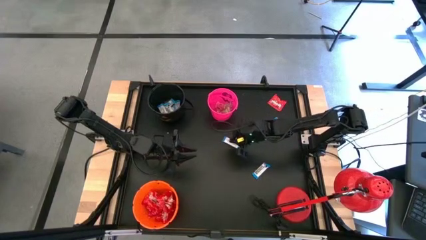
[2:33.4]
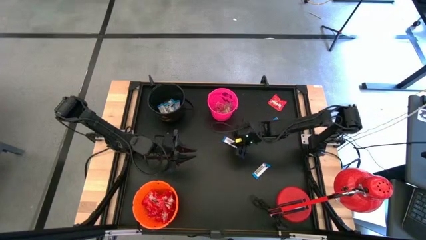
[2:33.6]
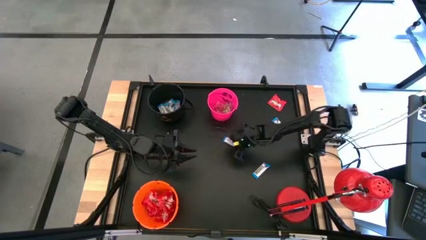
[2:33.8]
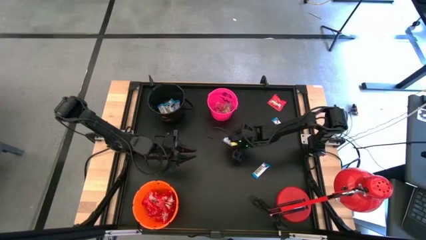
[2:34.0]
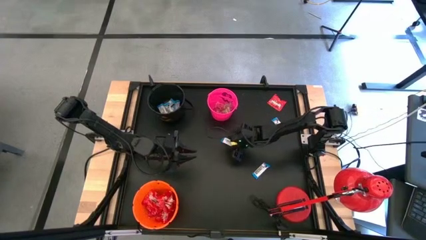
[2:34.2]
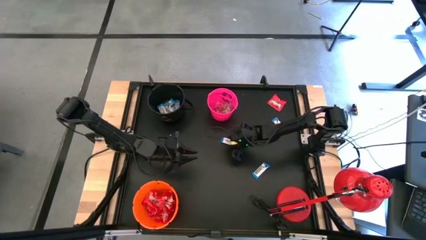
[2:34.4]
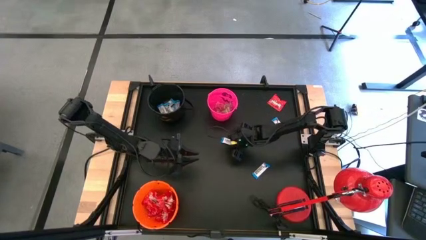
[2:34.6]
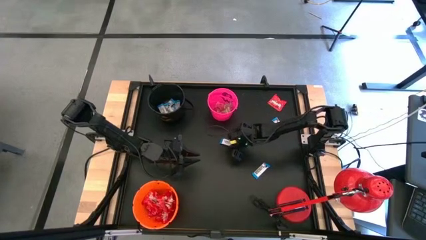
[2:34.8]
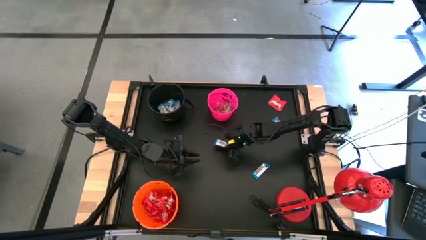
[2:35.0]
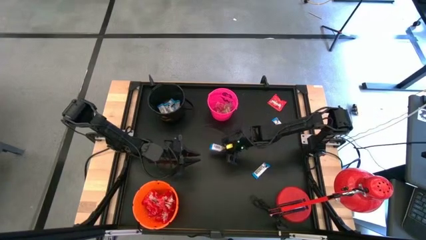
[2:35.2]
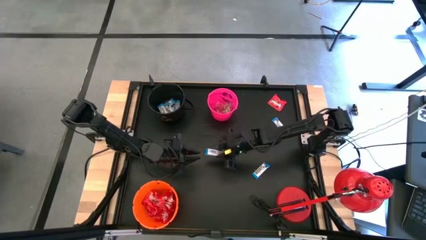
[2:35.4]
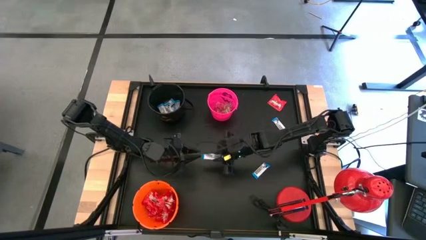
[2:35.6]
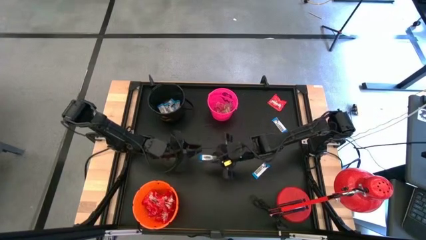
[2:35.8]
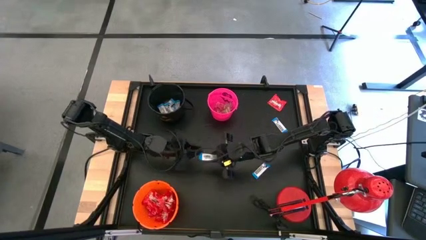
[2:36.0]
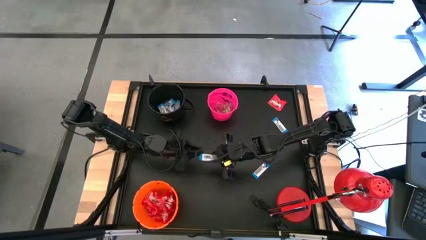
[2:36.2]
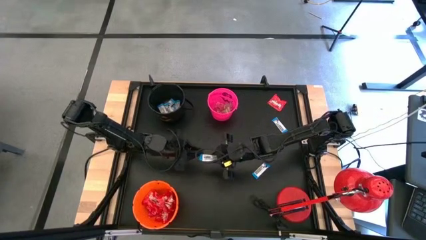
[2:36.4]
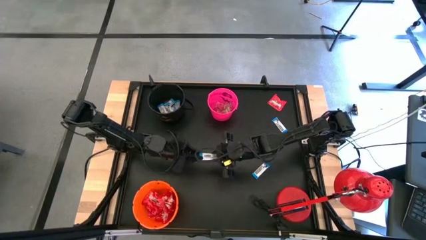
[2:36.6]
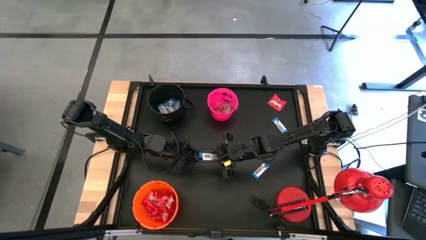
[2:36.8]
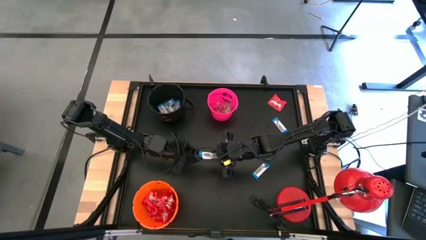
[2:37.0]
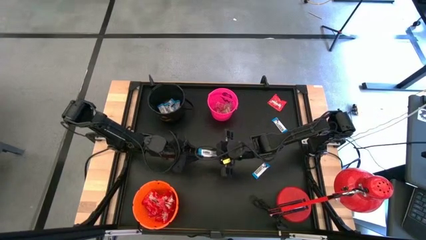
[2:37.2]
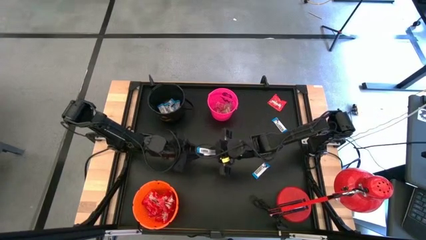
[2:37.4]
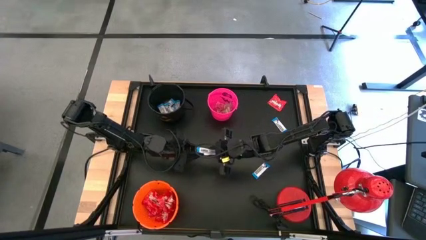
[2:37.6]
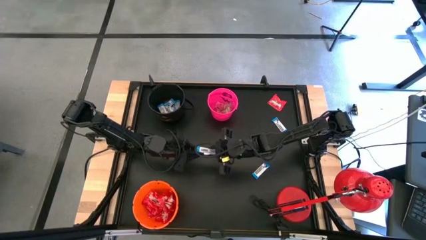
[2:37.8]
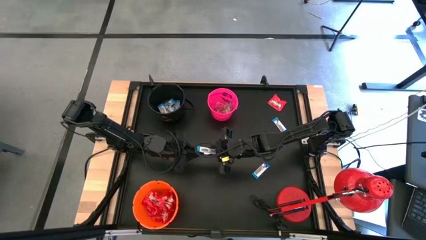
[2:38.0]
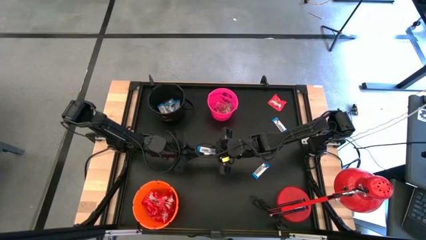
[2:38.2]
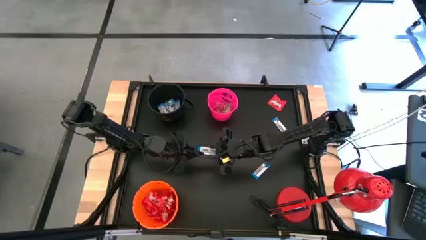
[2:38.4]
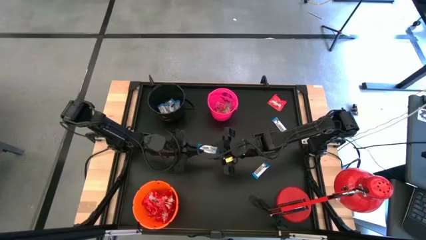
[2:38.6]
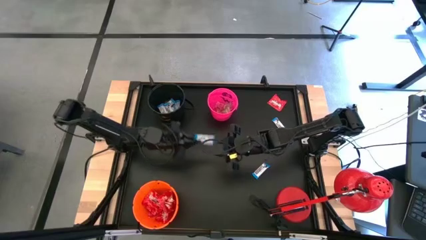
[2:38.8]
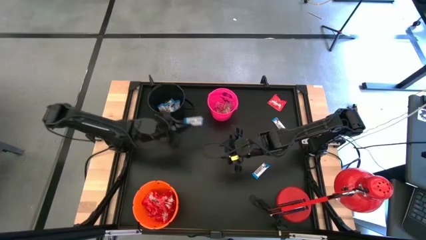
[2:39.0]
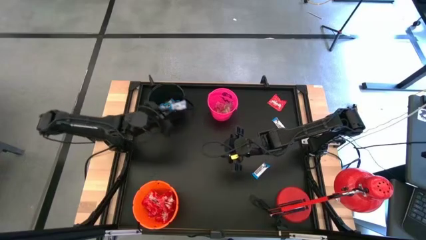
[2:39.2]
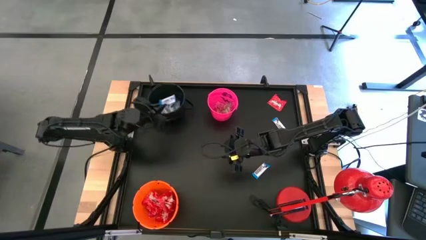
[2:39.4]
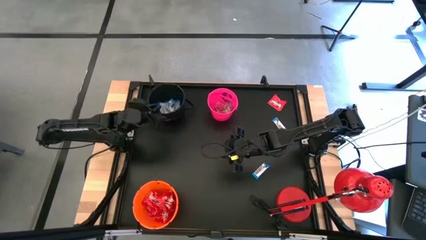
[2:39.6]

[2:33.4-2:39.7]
Task: Organize candy in baskets
Put the white chocolate bar into the black bucket

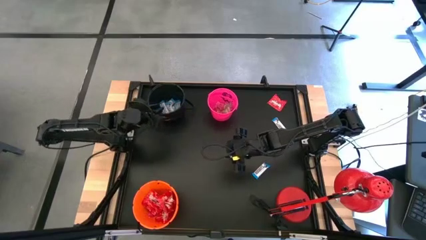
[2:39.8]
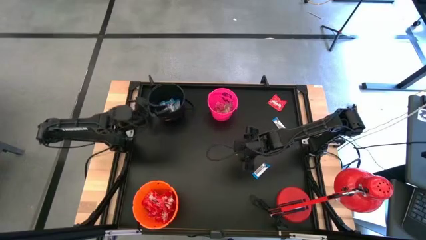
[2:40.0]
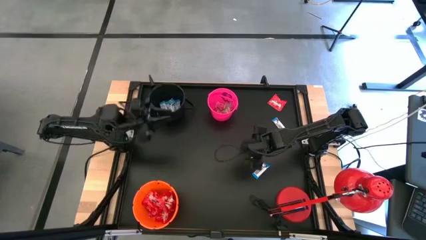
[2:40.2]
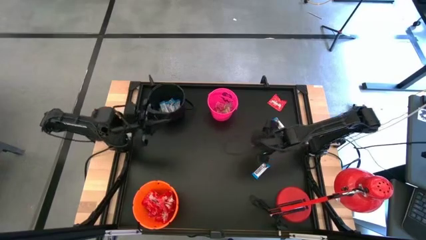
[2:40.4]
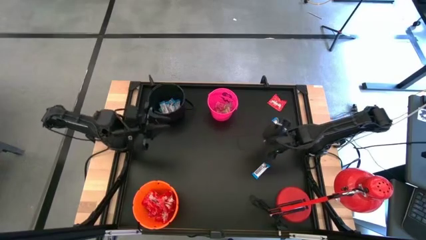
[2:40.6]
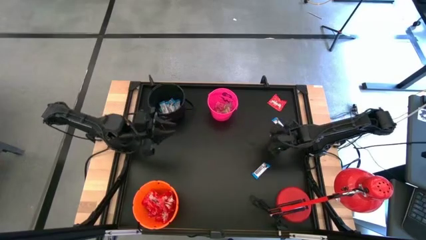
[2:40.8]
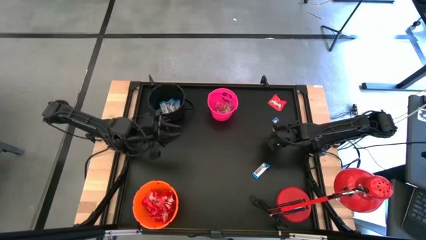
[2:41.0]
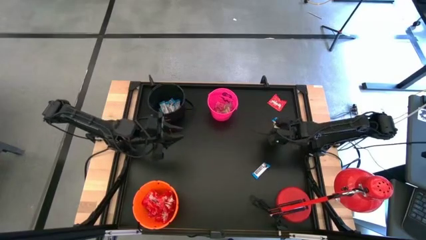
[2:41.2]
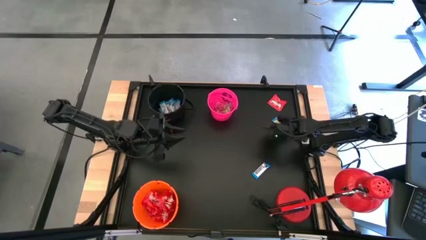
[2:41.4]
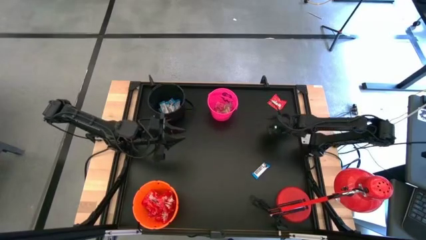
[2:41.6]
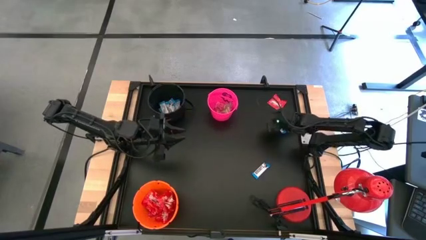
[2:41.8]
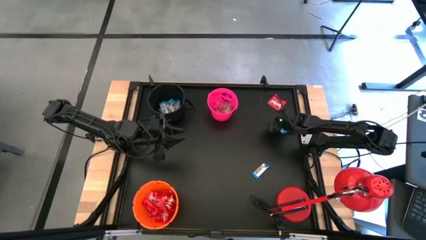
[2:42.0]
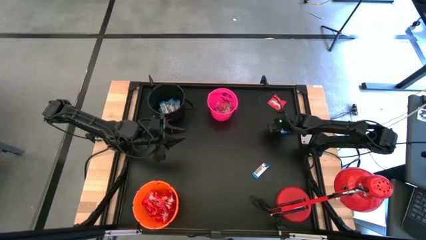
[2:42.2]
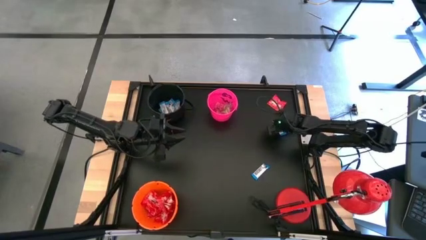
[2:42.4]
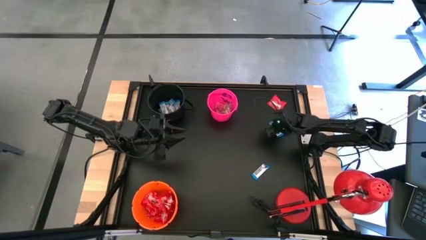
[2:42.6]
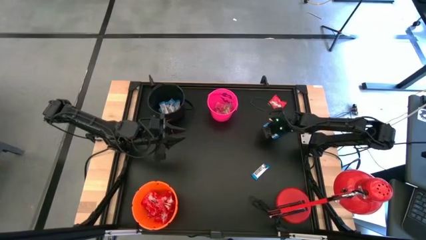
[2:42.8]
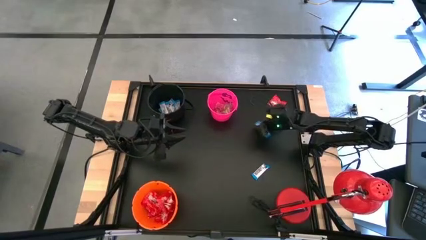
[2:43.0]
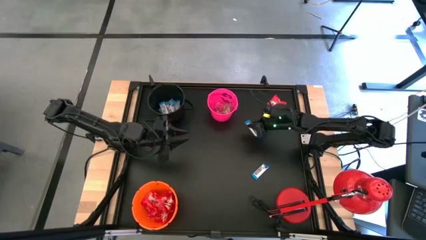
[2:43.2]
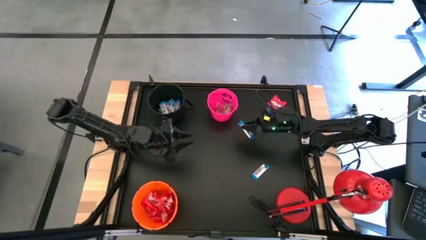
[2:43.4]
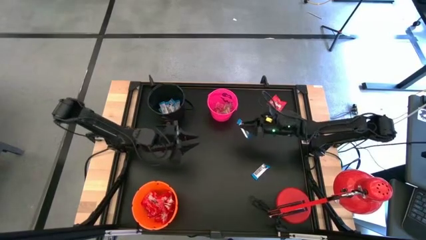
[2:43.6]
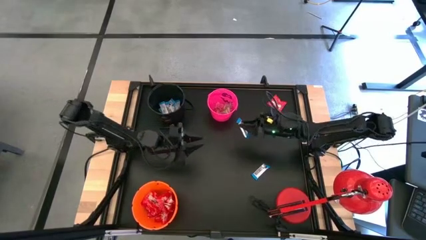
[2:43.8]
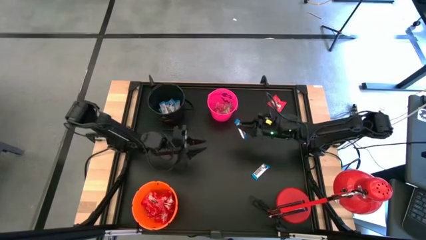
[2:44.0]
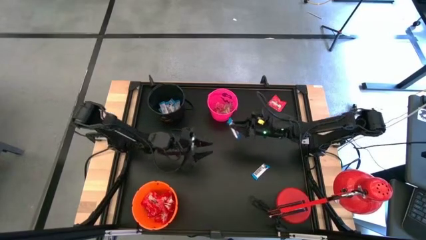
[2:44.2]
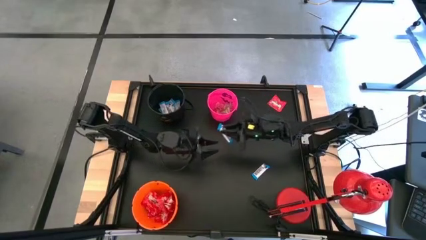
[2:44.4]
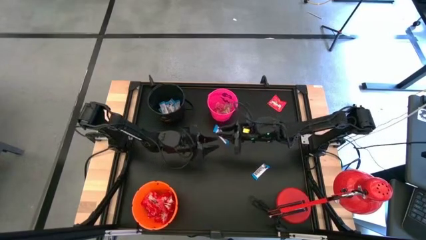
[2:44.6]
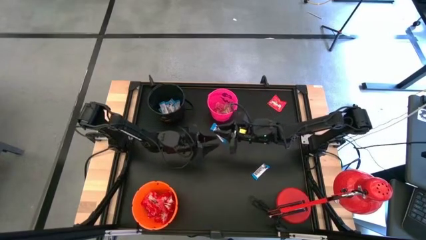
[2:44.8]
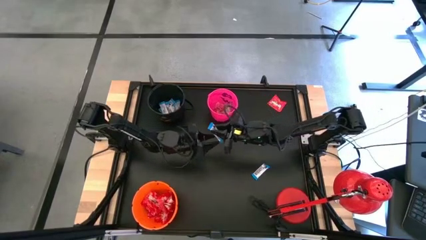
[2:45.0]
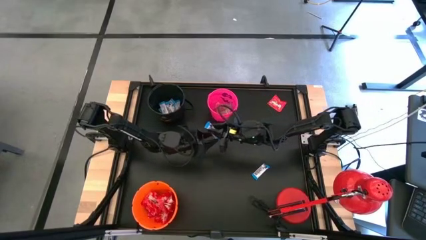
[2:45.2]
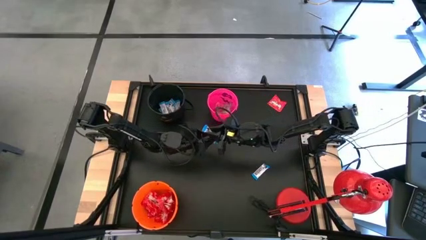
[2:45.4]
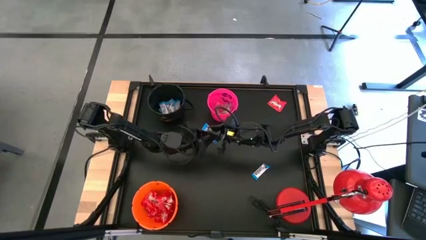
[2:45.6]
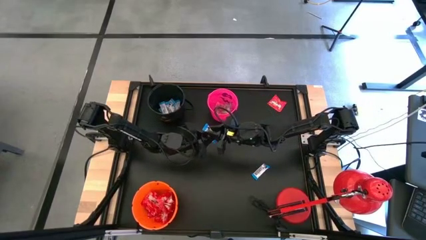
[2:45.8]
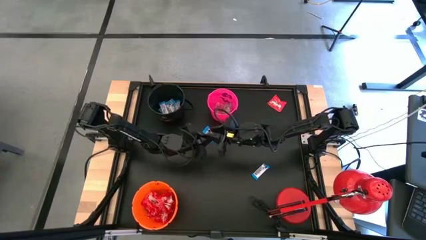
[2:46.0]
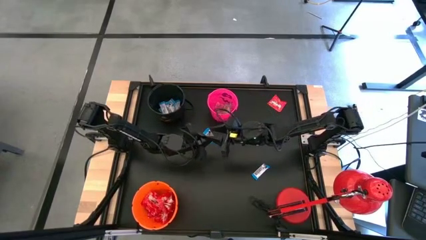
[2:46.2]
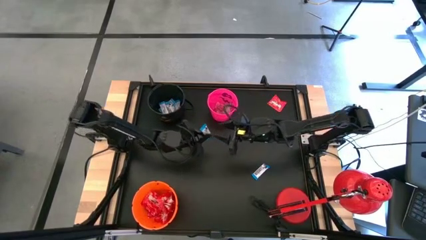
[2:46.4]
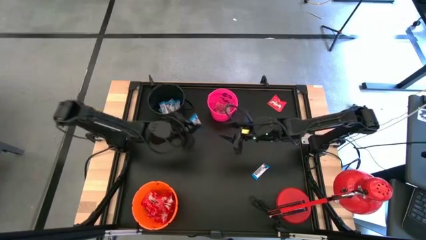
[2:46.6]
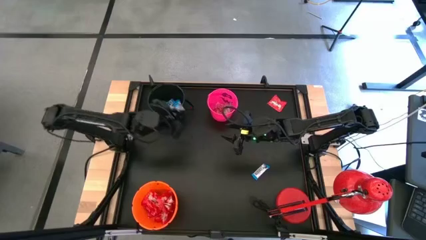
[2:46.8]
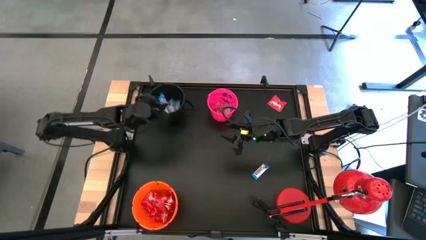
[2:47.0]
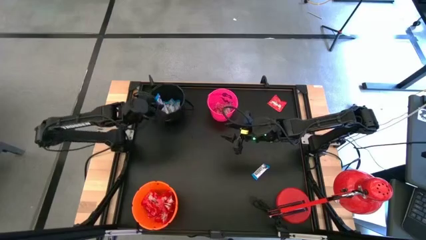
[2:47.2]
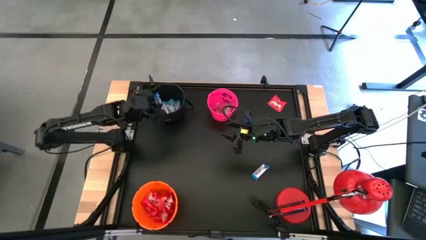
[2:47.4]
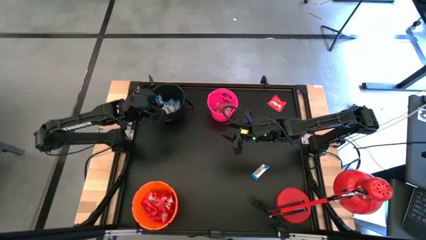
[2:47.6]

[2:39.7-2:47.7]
Put the white chocolate bar into the black bucket
